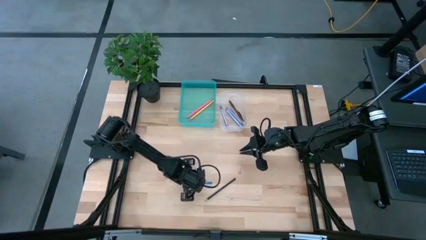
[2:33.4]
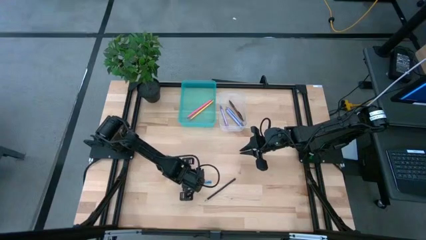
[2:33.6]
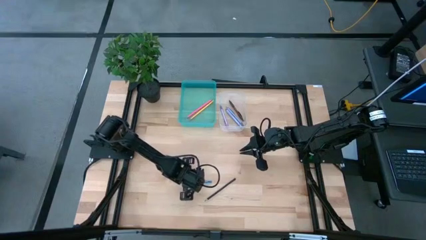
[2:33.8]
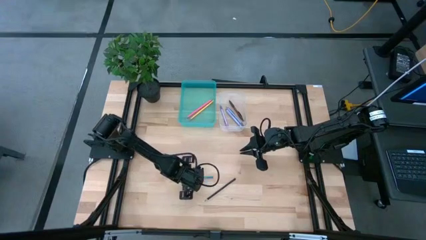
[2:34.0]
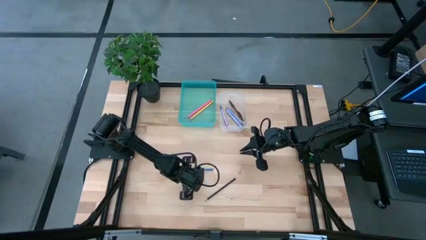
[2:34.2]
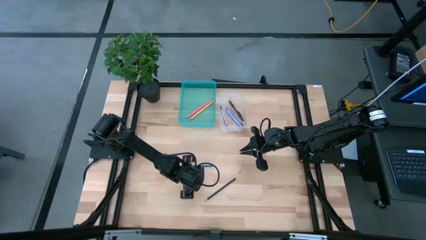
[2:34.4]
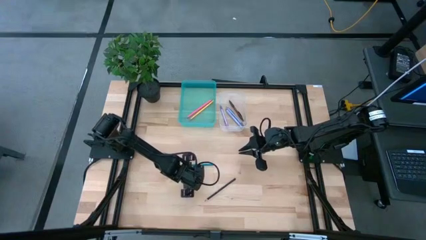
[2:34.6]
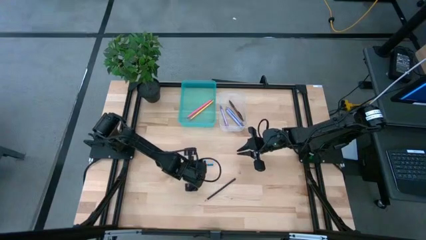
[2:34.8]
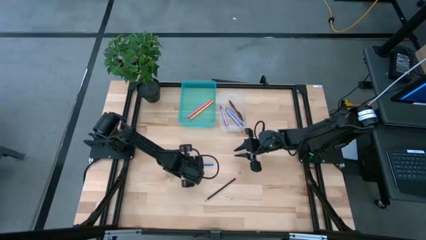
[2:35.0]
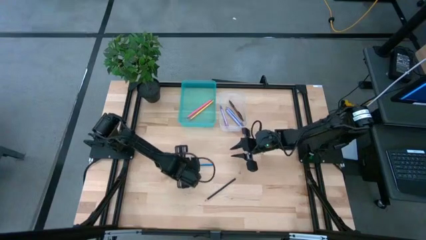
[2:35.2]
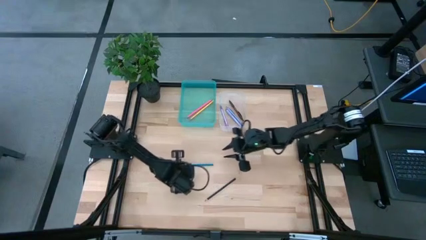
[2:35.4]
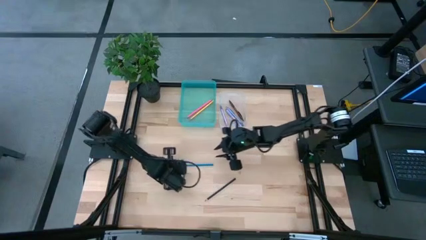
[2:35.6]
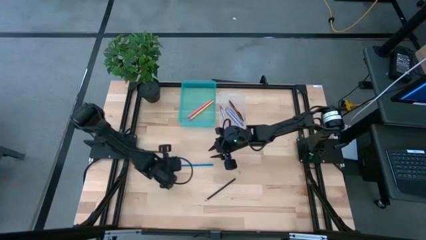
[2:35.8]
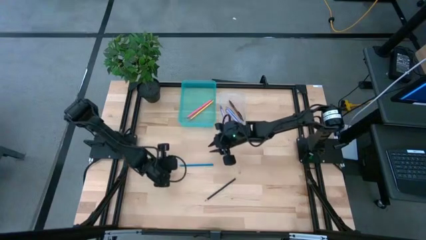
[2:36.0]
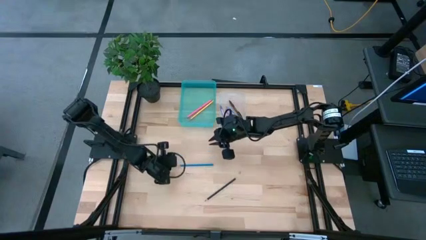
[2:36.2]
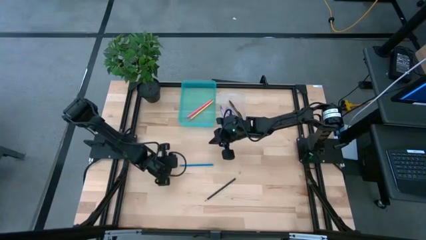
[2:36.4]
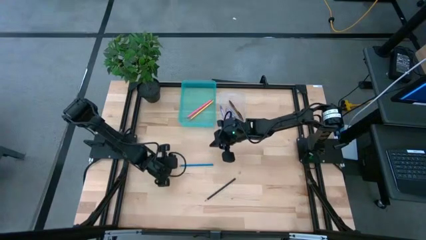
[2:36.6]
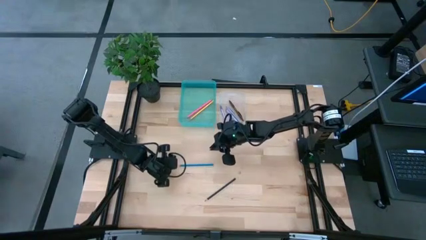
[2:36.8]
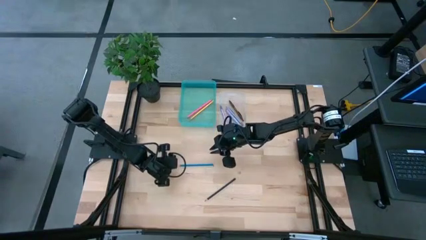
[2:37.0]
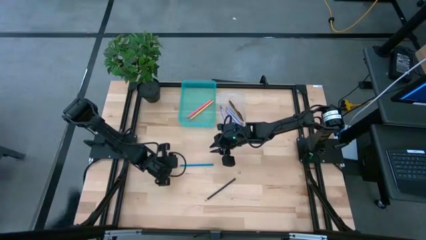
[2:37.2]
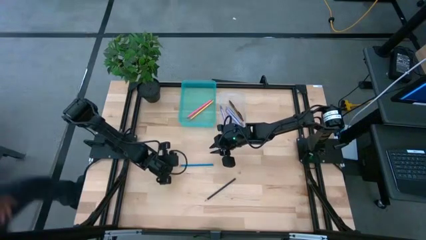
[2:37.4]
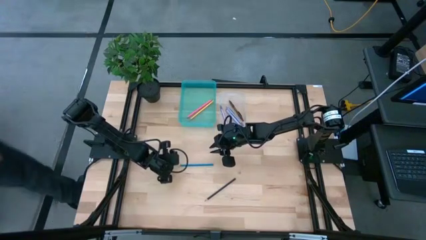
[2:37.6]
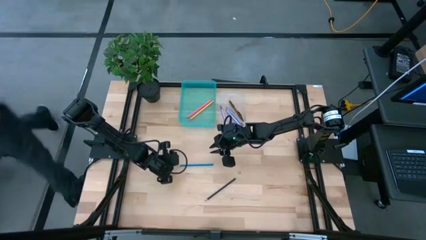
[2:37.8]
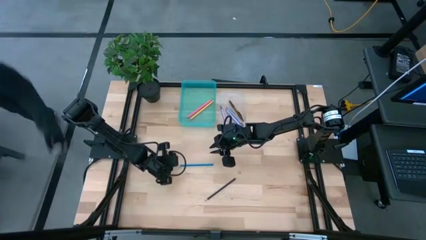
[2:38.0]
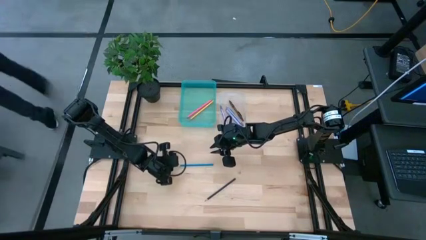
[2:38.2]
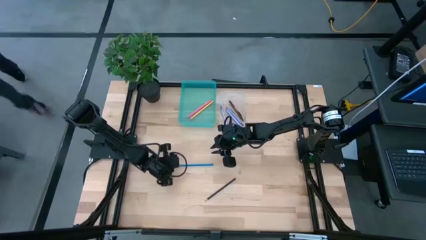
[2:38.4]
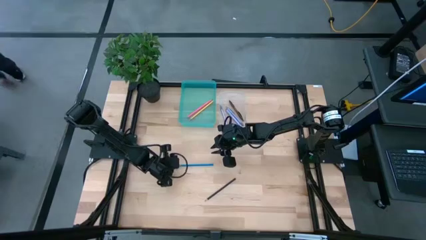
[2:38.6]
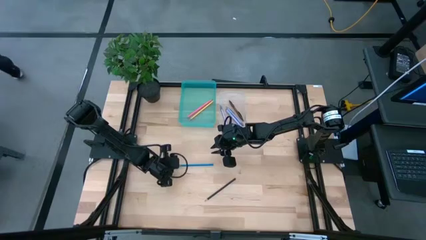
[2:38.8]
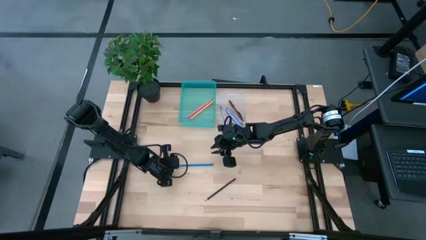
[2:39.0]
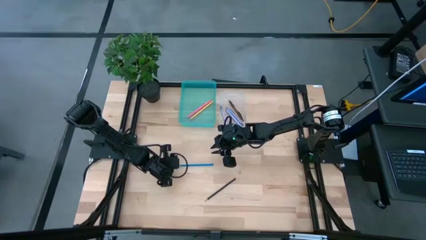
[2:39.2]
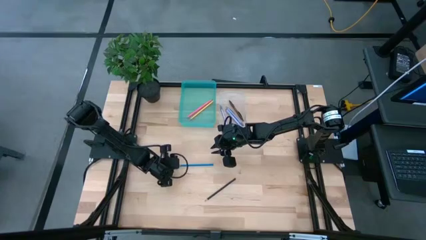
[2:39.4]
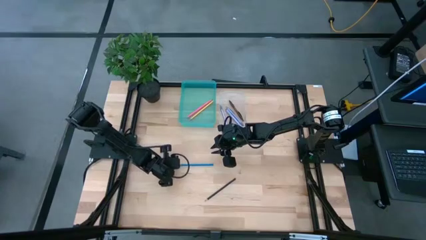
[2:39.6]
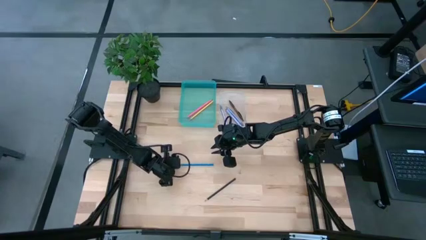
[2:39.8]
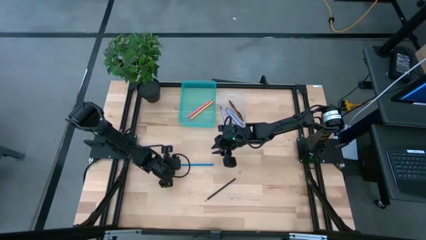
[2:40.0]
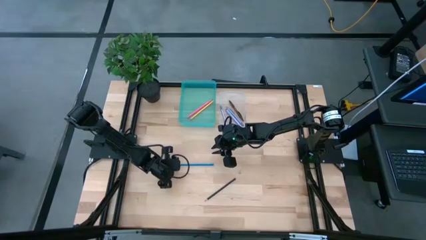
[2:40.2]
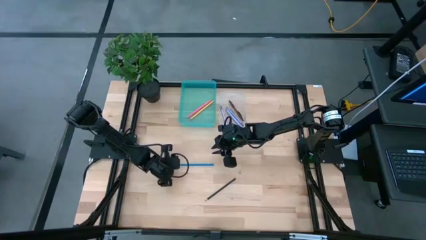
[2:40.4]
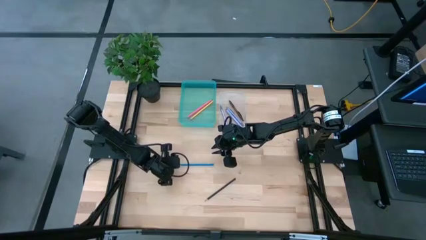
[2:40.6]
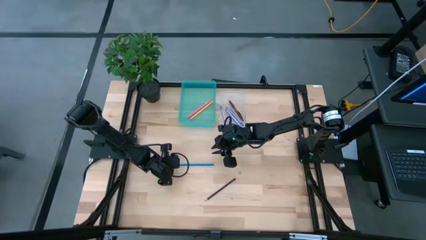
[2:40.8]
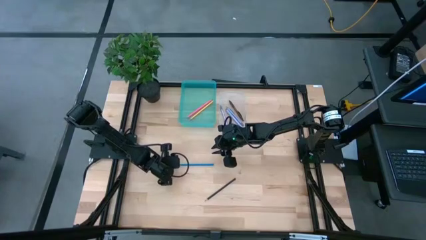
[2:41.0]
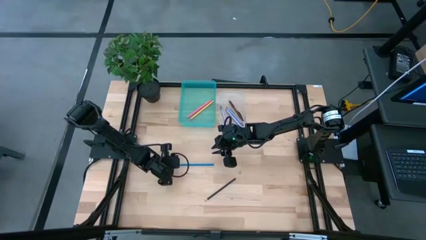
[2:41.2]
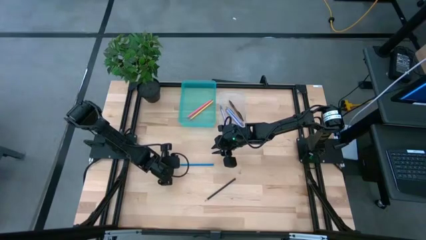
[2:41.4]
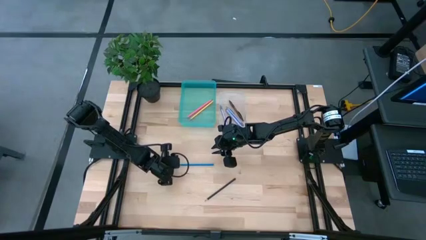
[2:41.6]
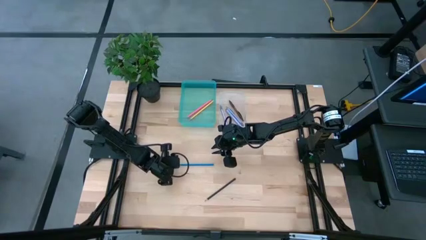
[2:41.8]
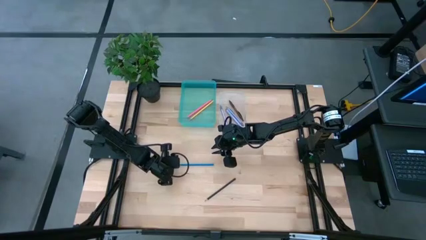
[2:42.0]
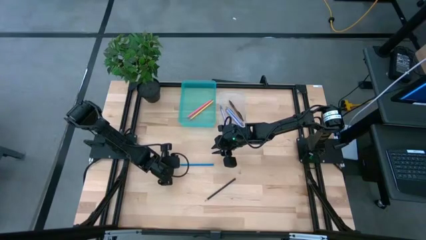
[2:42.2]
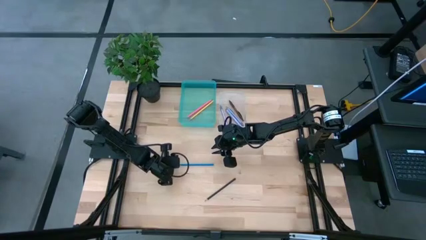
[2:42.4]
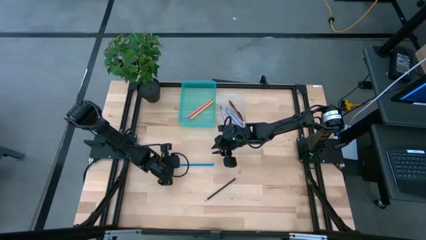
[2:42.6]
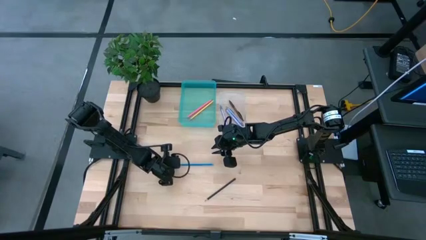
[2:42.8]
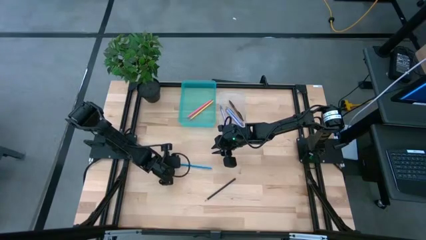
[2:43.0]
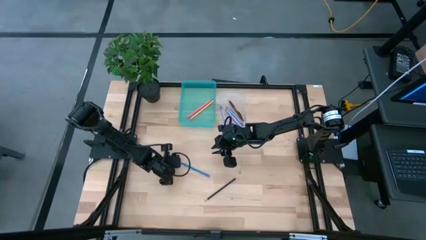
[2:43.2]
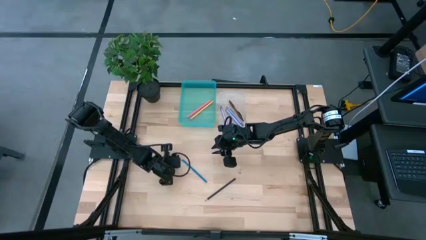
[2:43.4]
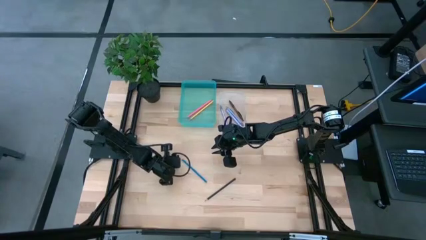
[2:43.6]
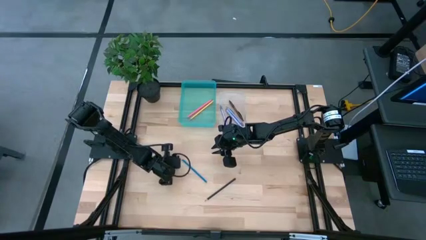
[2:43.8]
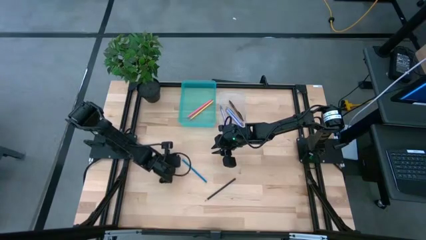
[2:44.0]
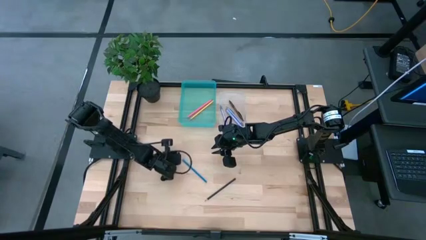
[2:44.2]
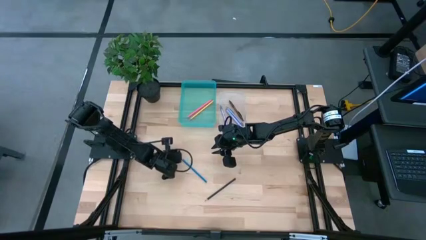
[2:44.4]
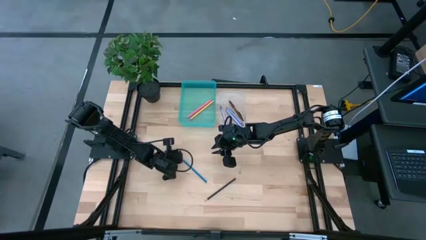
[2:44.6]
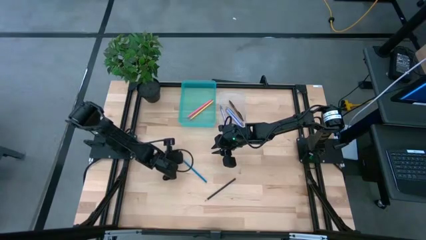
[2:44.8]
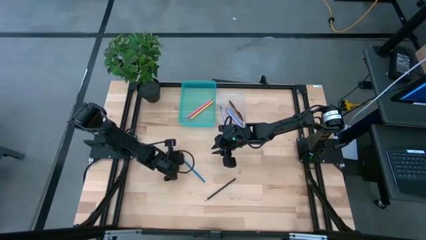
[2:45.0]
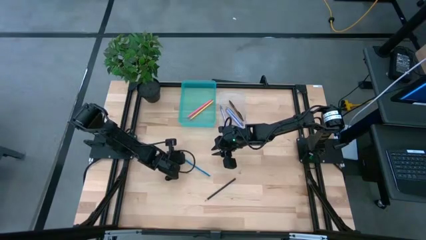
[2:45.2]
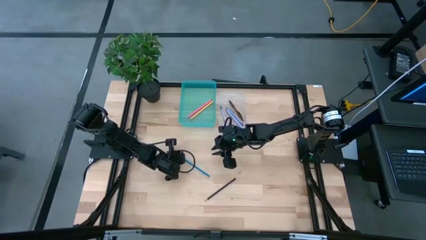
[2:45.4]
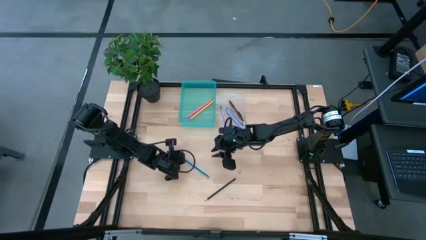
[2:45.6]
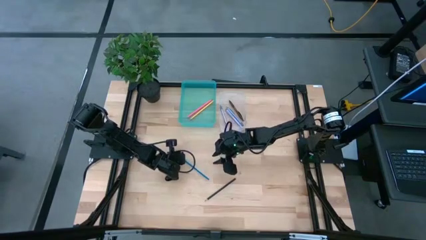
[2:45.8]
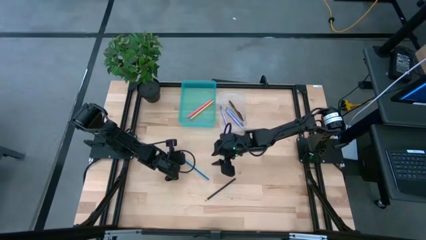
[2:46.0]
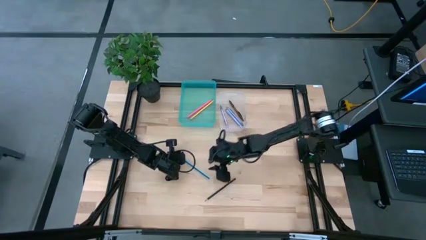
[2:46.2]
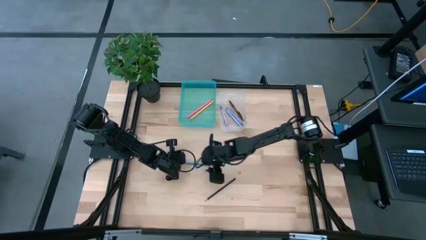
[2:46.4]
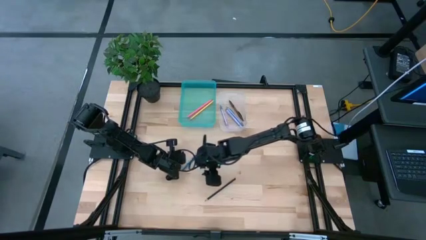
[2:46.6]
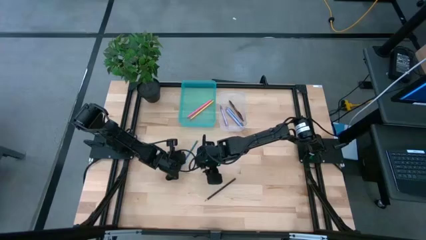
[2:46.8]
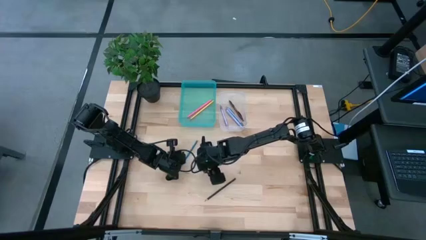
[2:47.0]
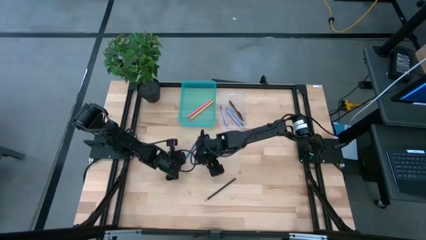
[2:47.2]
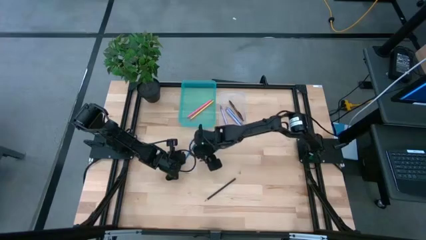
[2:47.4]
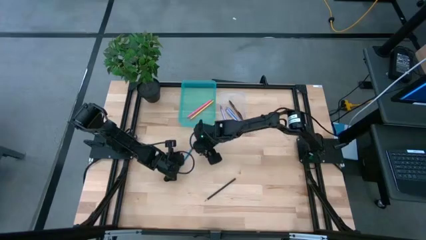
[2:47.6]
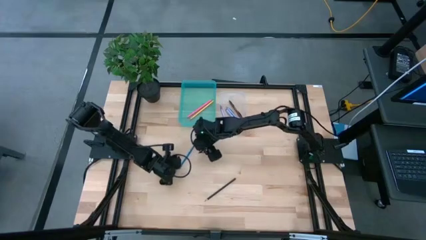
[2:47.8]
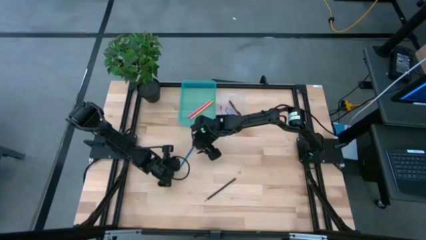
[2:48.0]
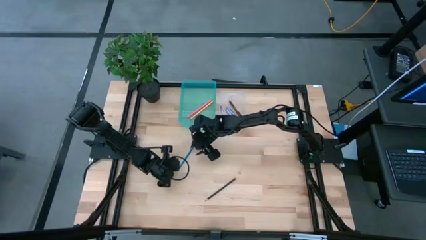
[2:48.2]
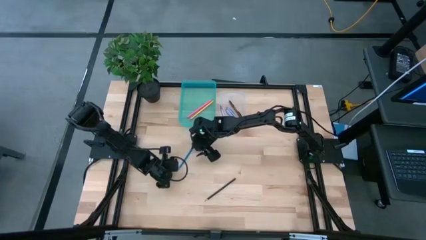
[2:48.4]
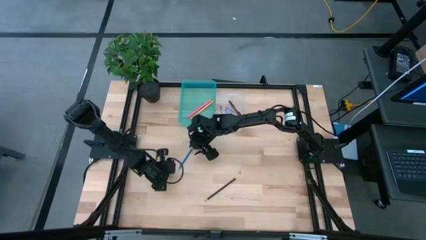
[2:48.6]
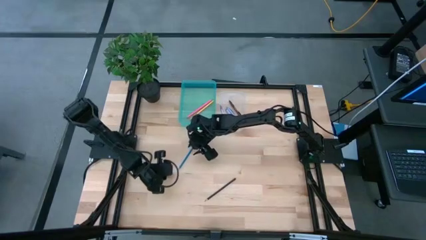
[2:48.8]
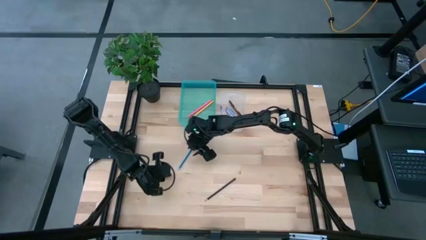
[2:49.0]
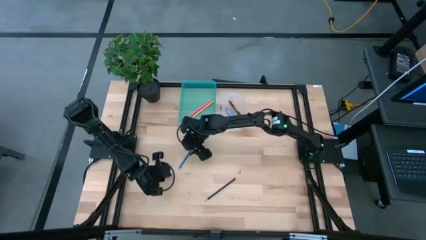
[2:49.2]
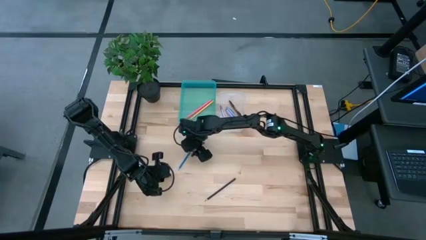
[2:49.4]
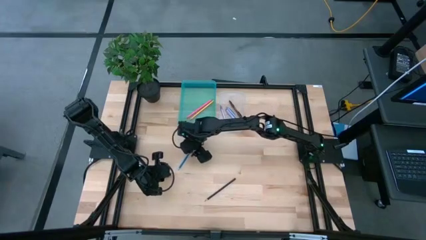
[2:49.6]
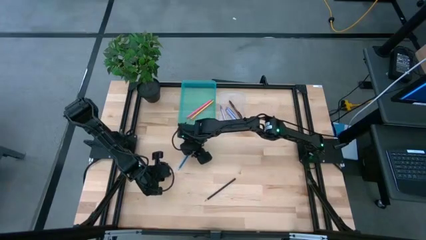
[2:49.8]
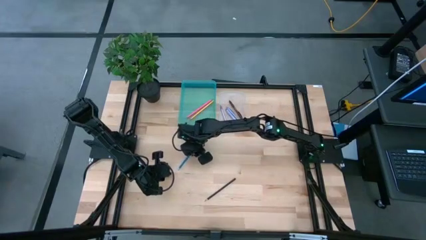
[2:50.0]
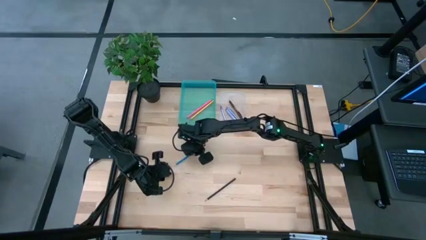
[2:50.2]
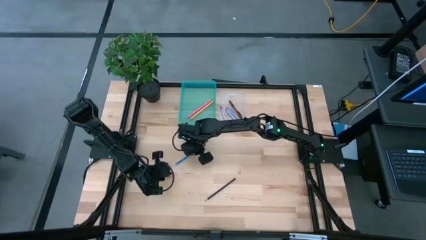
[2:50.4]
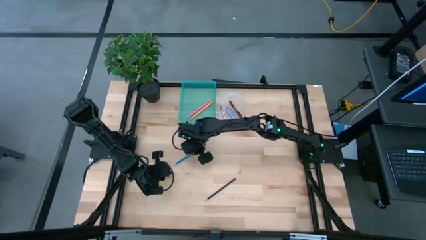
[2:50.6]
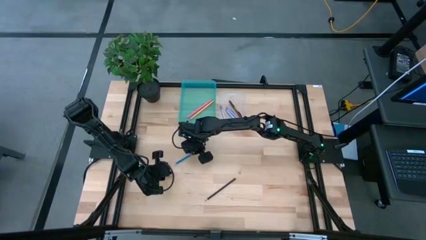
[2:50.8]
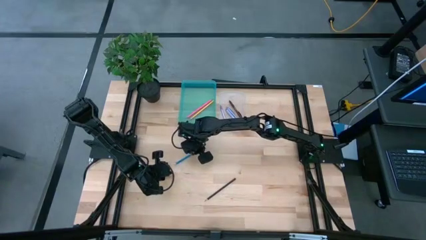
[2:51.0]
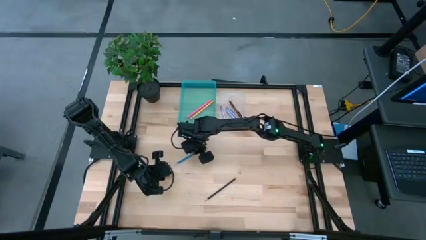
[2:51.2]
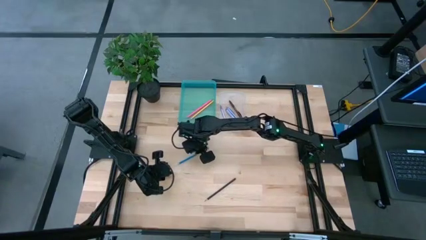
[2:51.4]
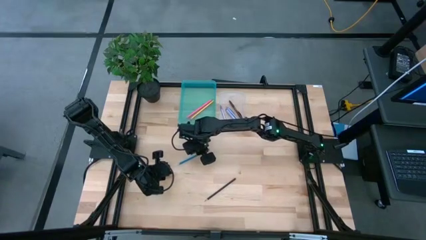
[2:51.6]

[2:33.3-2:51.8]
Task: Sort pens & pencils
Put the blue pencil into the blue bin
